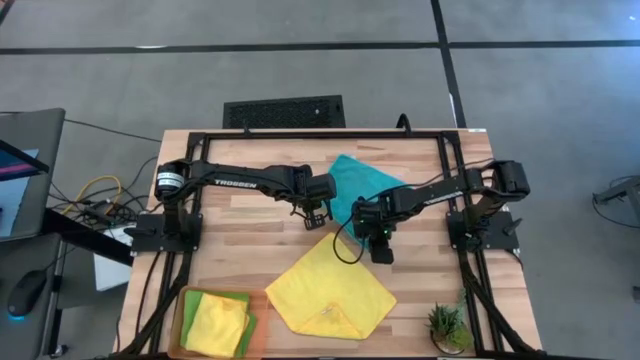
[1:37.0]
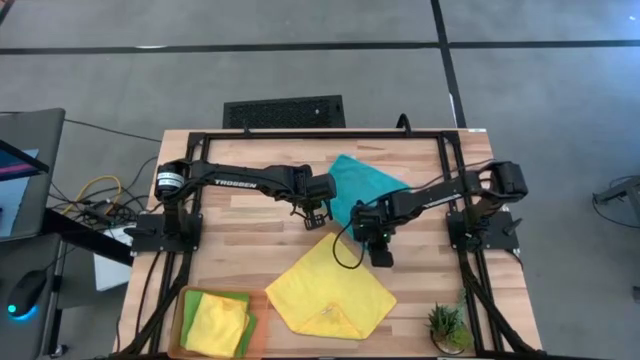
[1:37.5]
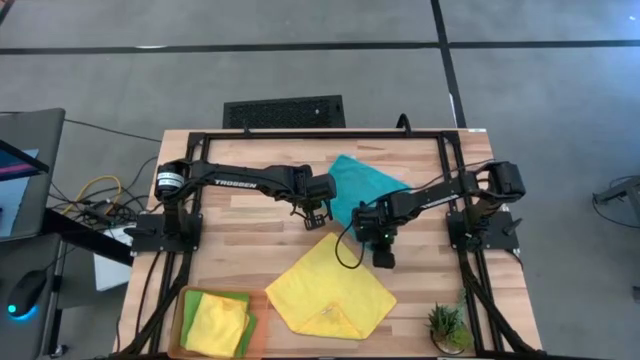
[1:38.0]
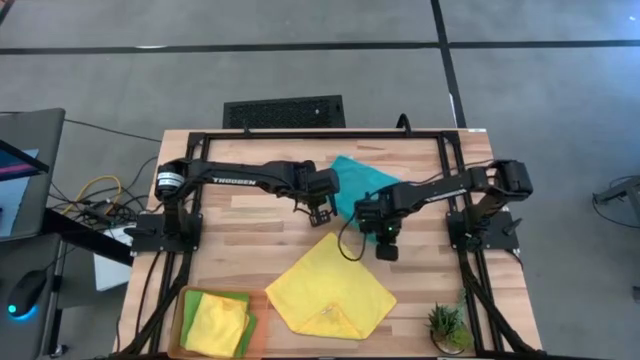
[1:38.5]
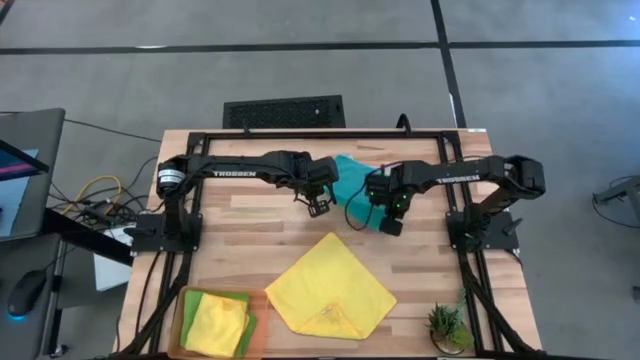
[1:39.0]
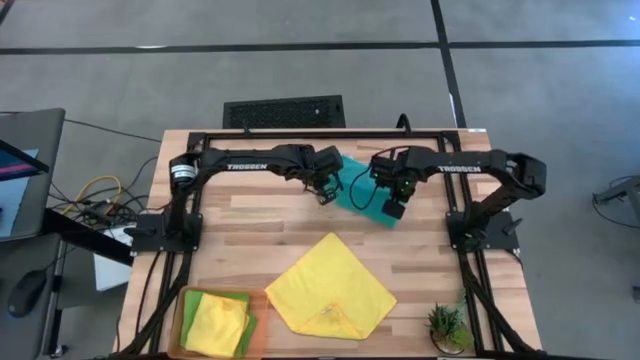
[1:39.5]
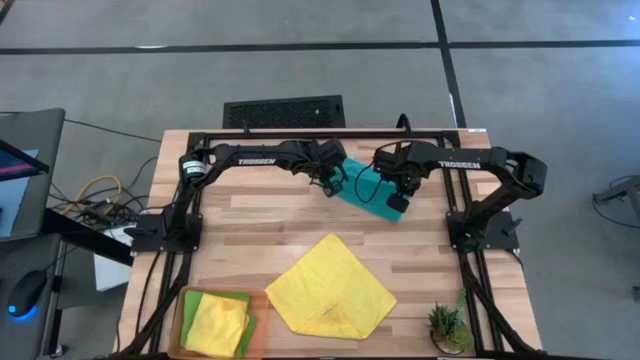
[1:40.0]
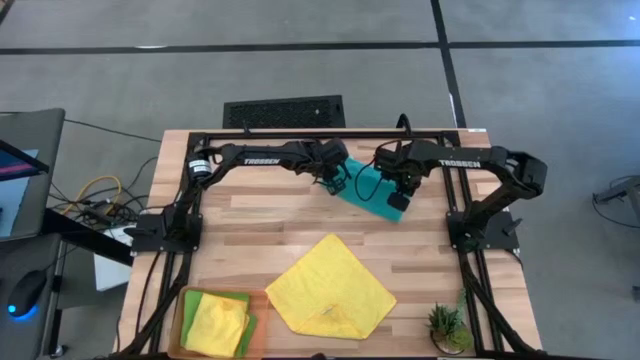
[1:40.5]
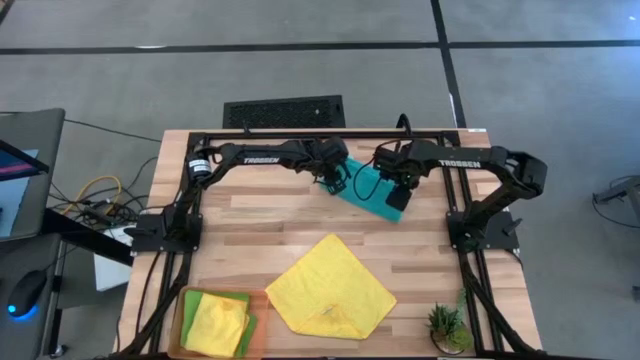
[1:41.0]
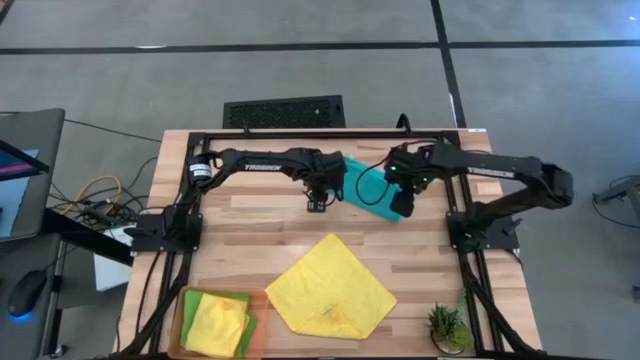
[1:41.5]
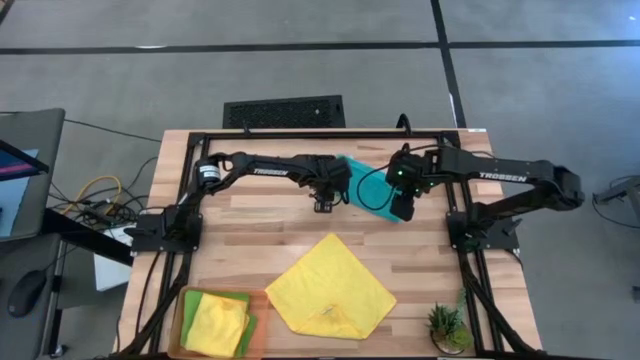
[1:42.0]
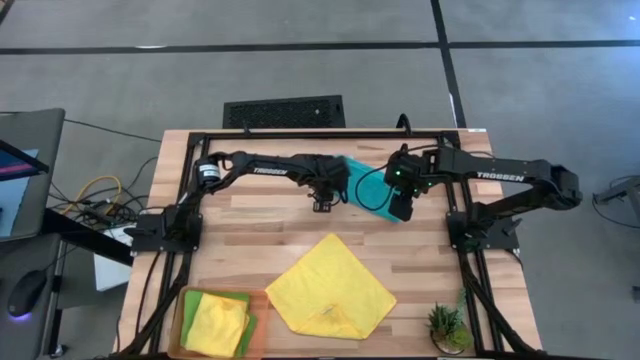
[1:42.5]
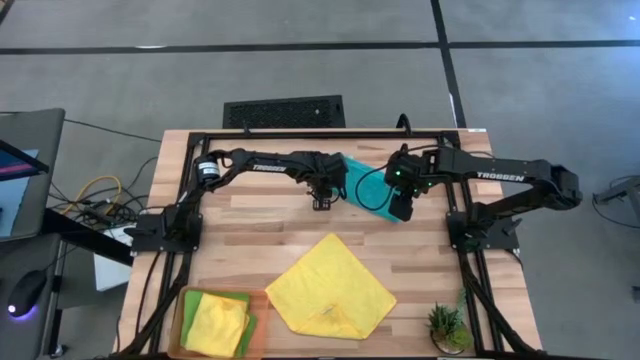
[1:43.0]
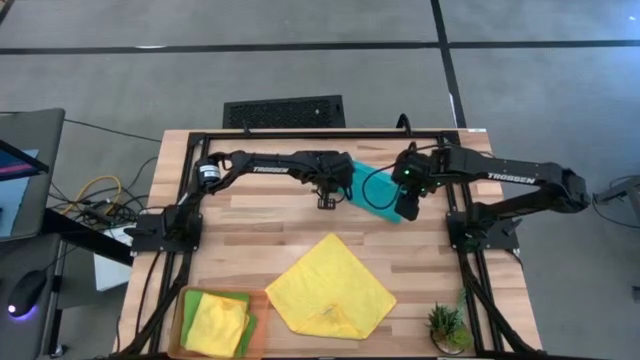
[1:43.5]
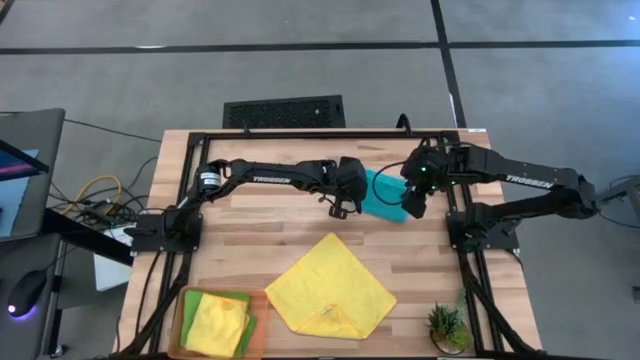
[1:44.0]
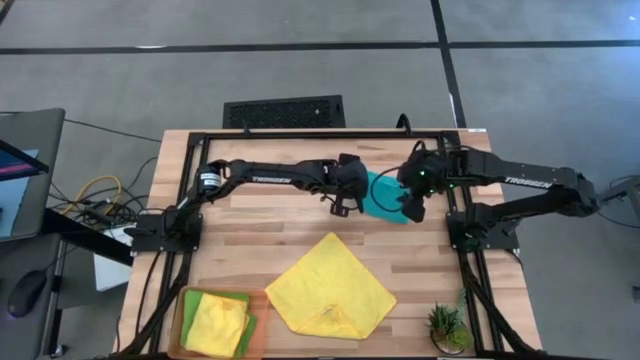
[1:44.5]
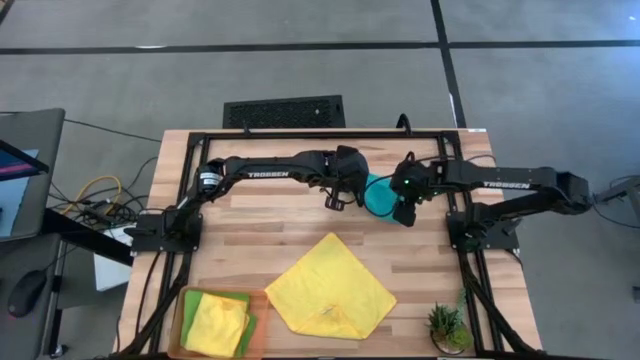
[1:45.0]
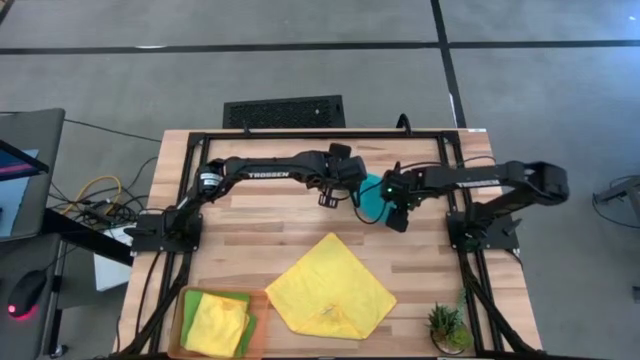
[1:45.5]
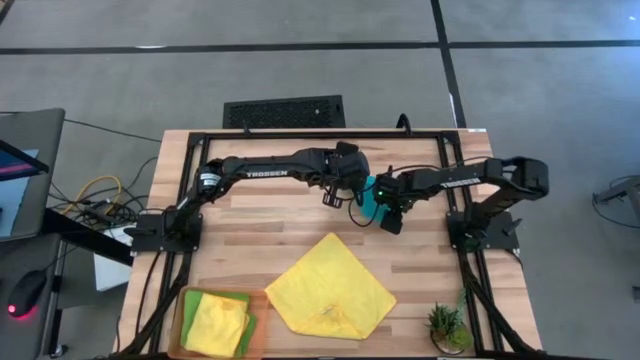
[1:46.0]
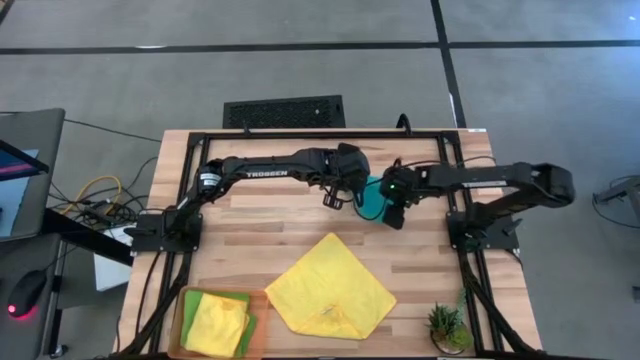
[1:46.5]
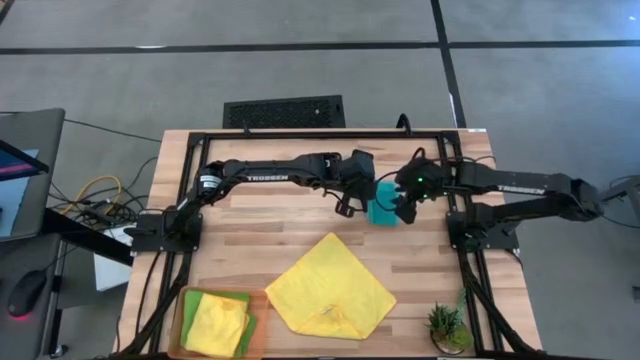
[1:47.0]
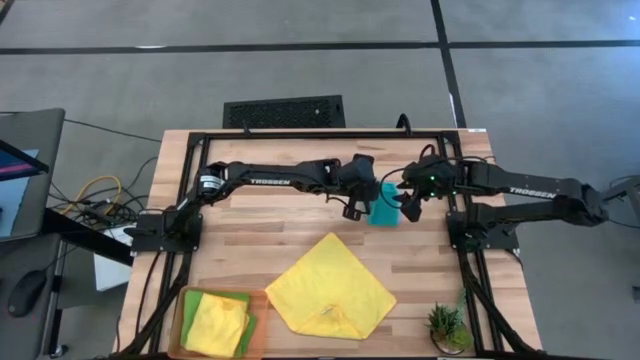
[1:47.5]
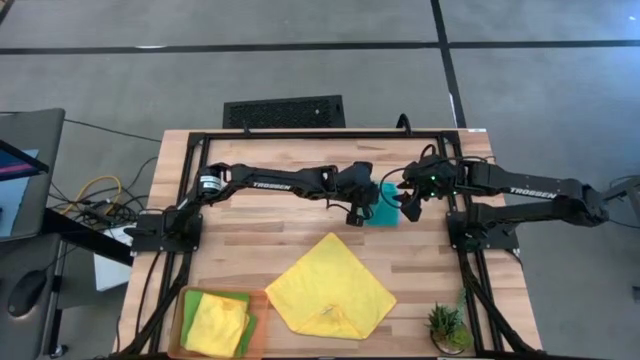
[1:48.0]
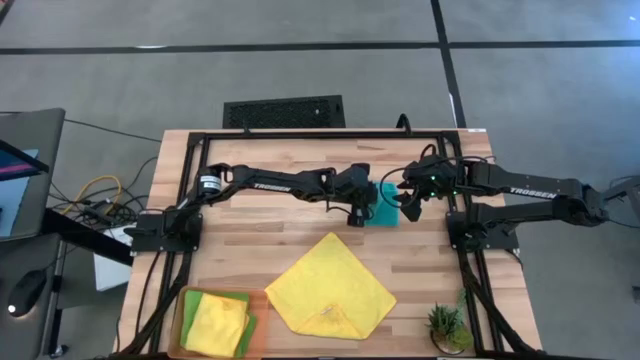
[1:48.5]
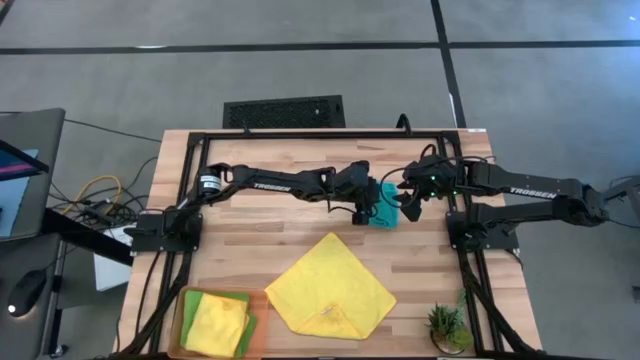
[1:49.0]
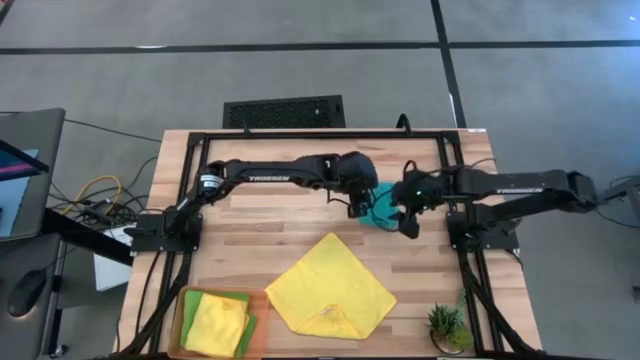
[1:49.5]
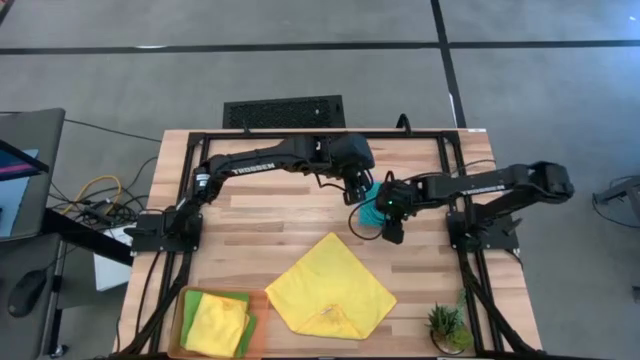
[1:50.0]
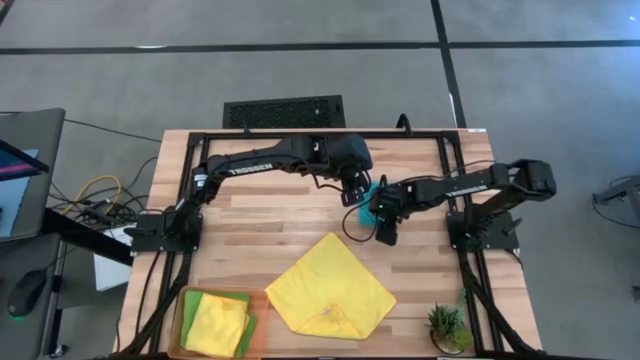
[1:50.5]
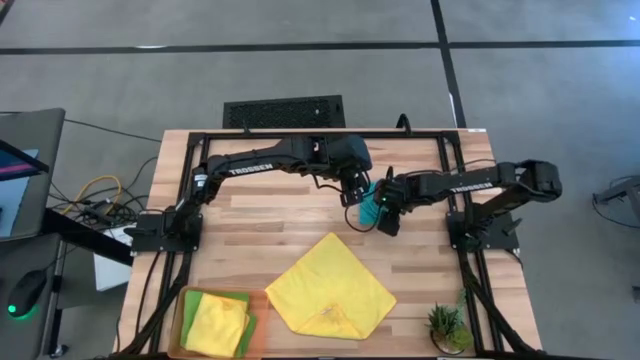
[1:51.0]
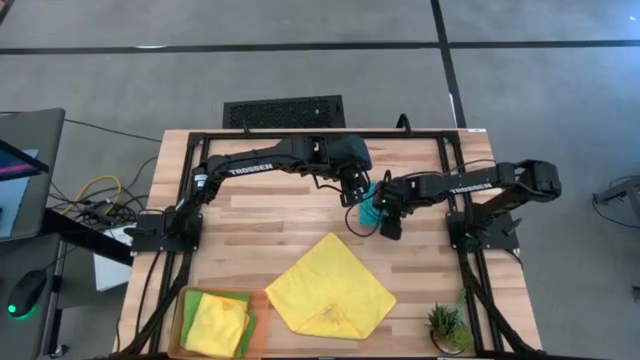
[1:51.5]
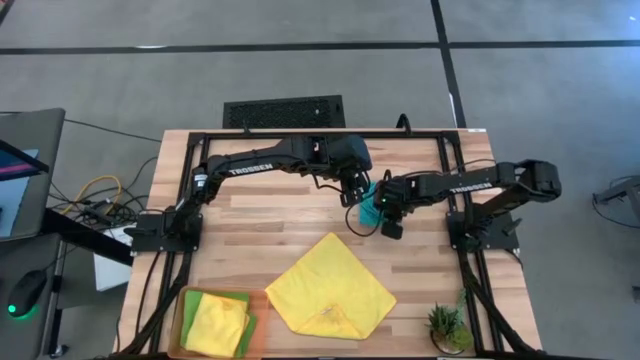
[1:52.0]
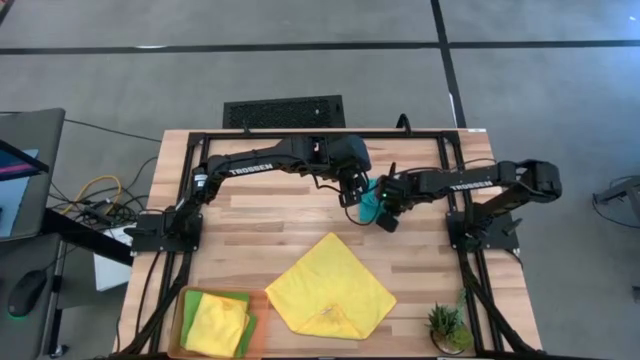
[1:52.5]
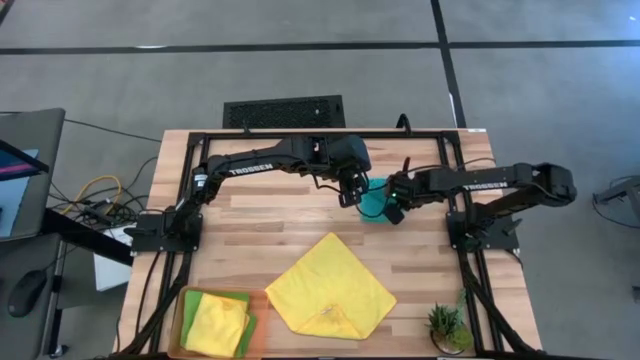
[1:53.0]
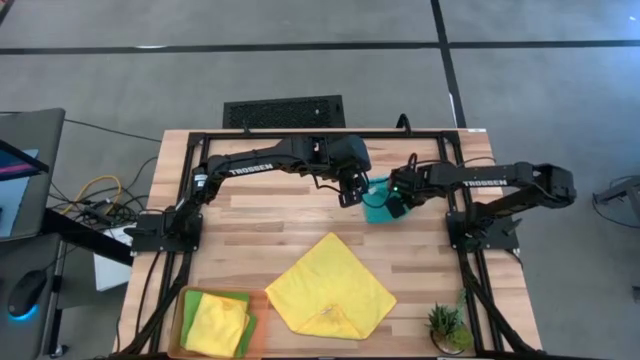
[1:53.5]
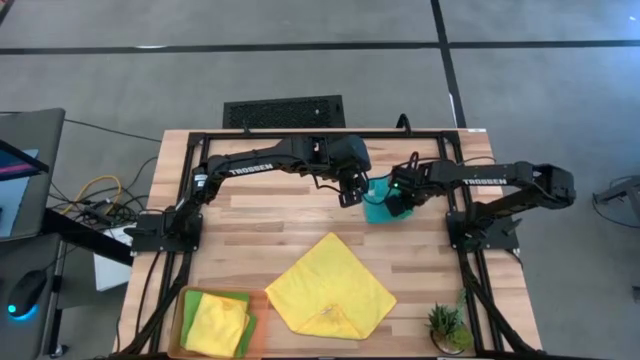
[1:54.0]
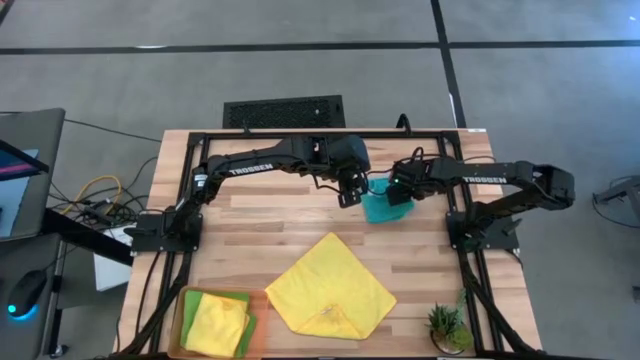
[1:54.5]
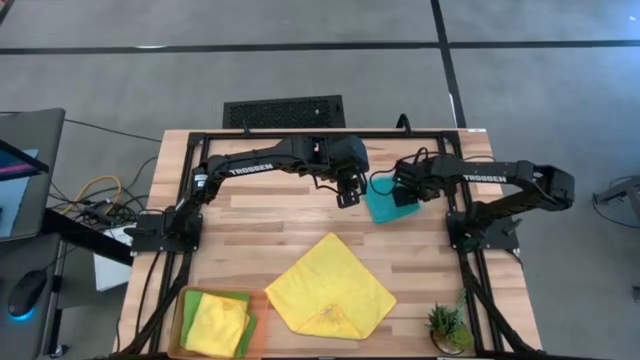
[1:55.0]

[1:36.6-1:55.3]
Task: Fold microfiber towels
Fold the blue microfiber towel

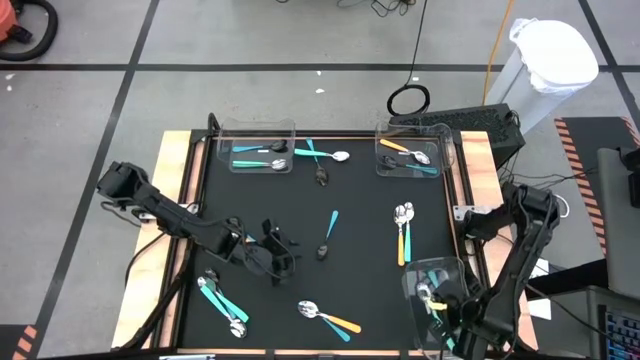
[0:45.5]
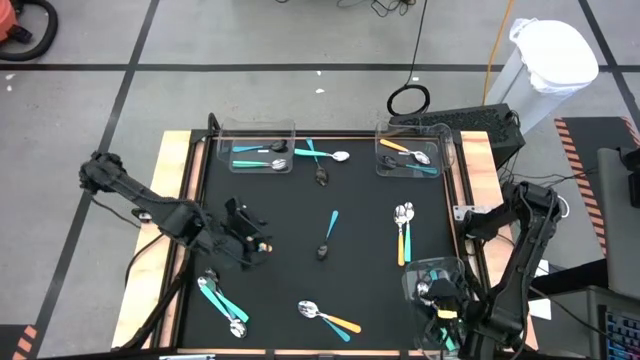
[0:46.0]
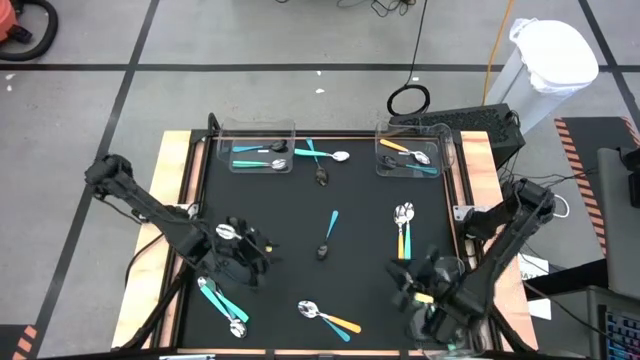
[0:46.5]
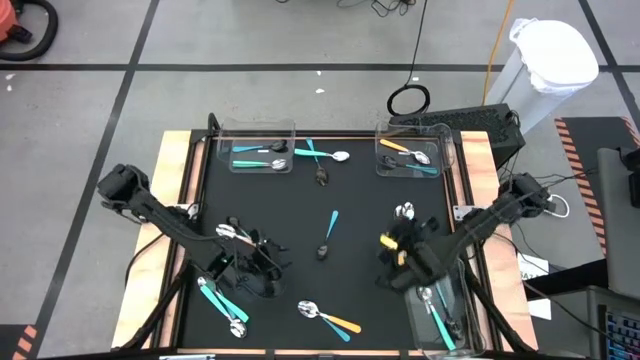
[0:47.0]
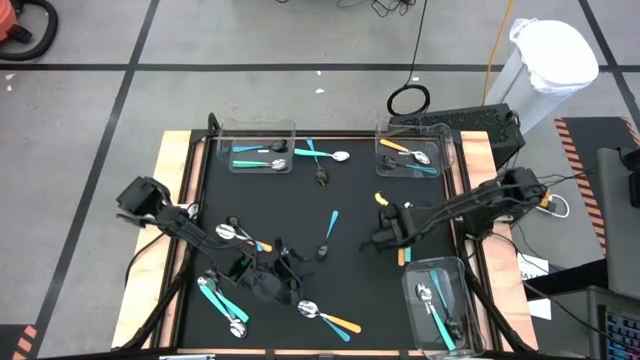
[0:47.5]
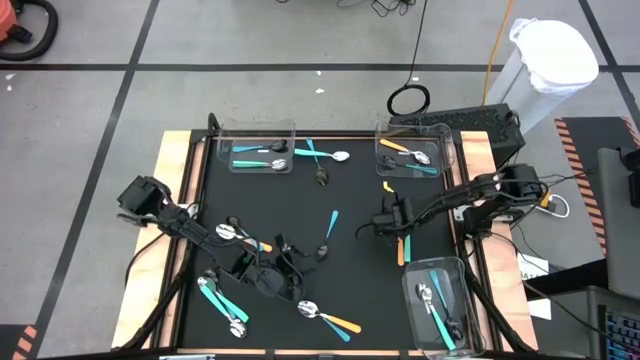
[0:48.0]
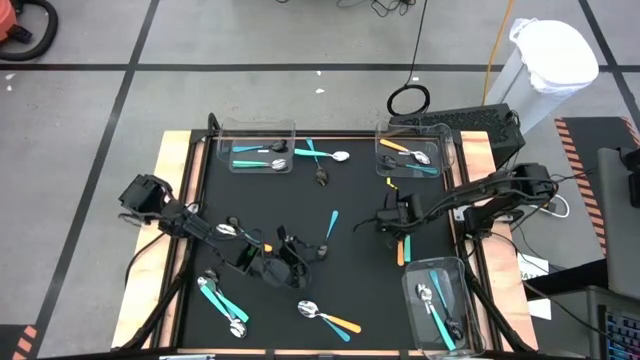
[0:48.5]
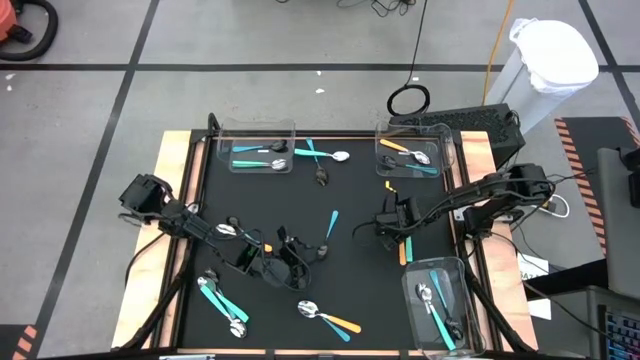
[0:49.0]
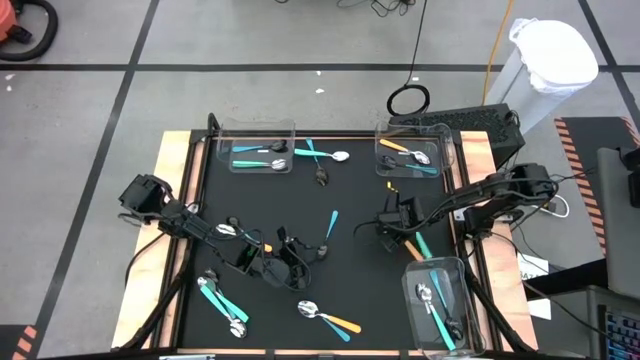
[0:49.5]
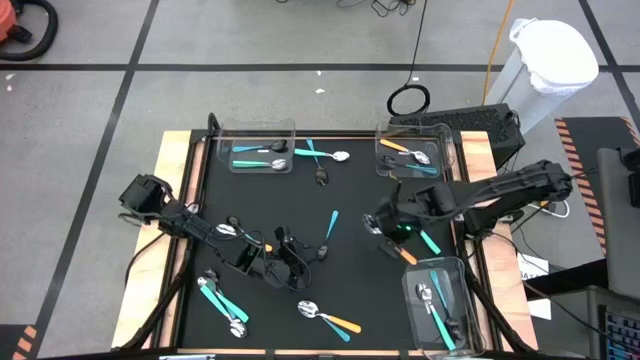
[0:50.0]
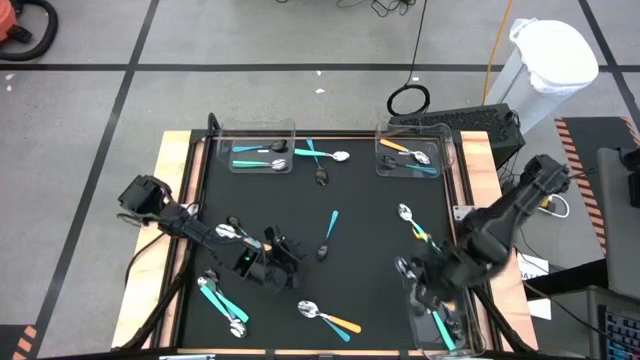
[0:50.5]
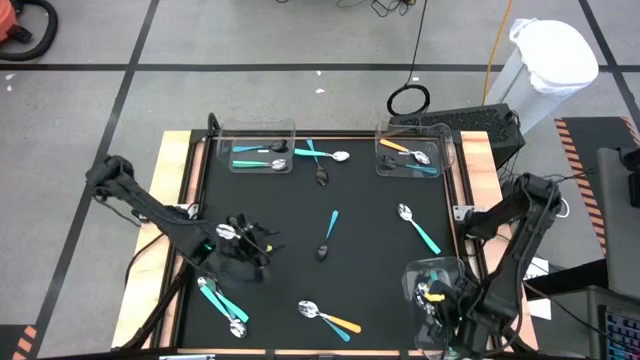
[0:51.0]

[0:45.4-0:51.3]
Task: Sort silverware by color (type)
Put the yellow spoon into the bottom right transparent bin
